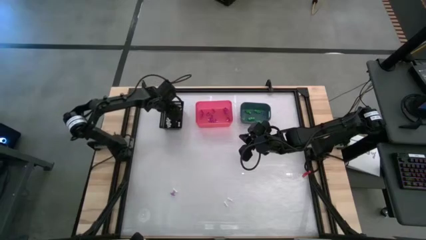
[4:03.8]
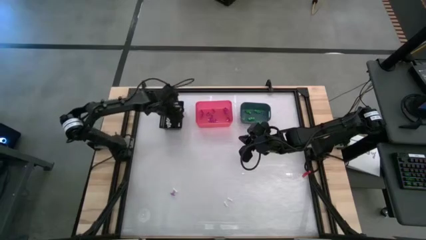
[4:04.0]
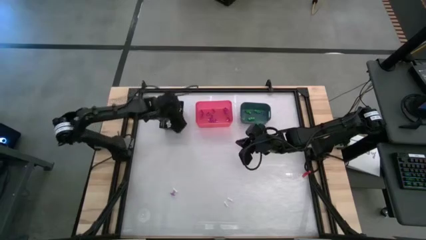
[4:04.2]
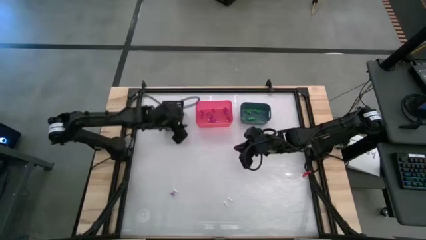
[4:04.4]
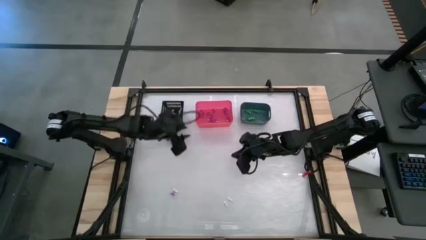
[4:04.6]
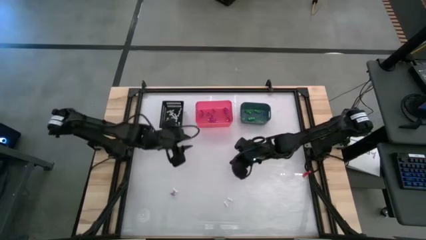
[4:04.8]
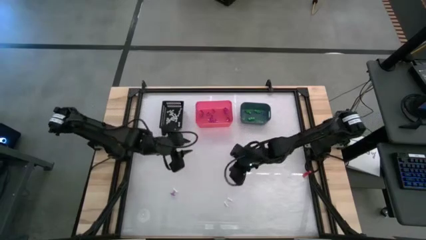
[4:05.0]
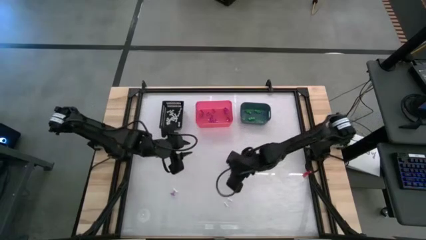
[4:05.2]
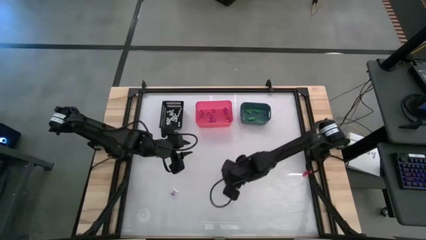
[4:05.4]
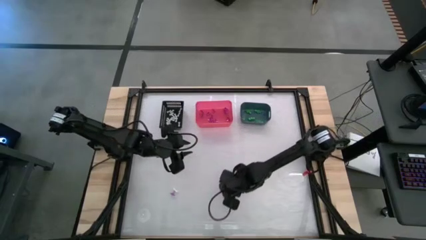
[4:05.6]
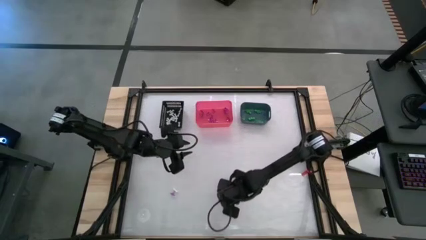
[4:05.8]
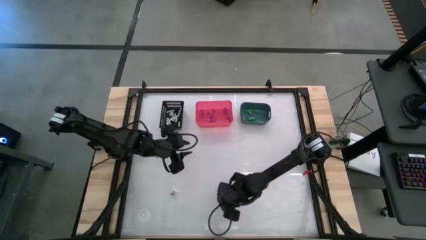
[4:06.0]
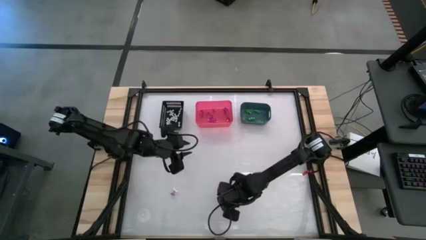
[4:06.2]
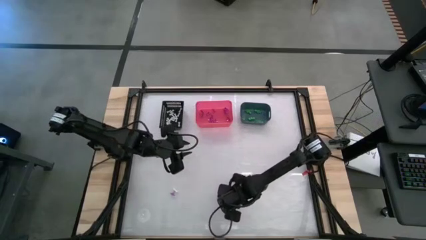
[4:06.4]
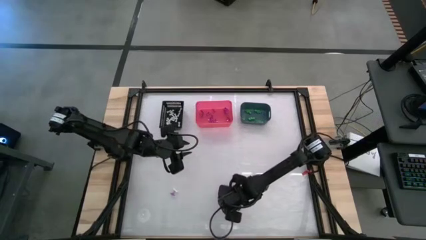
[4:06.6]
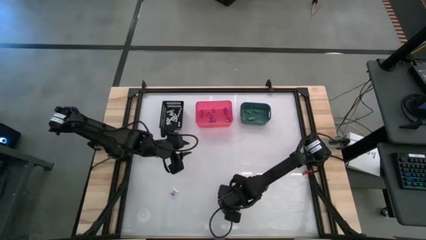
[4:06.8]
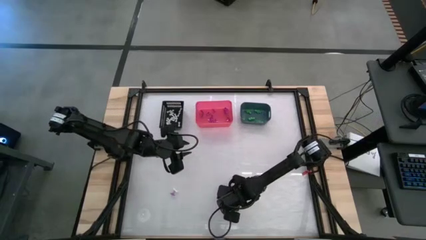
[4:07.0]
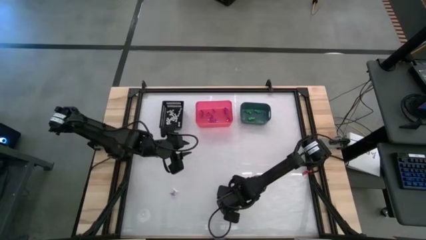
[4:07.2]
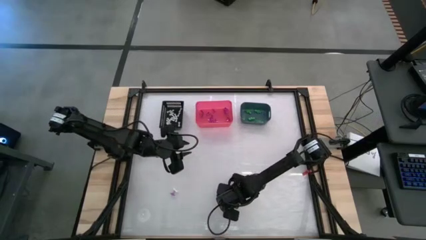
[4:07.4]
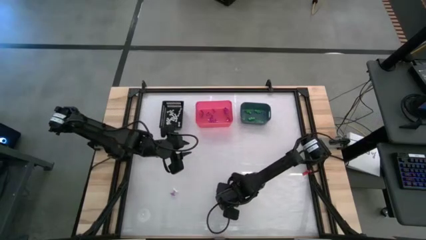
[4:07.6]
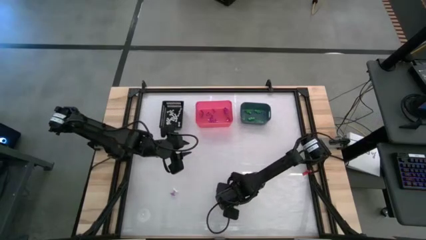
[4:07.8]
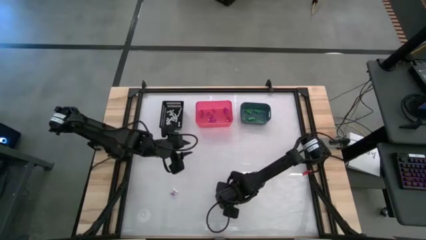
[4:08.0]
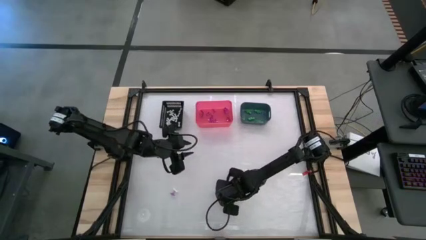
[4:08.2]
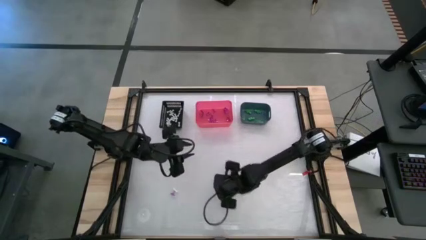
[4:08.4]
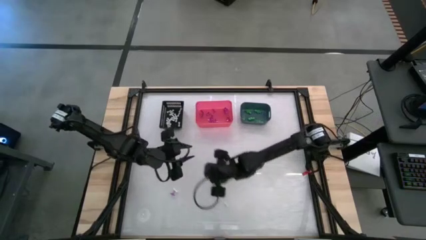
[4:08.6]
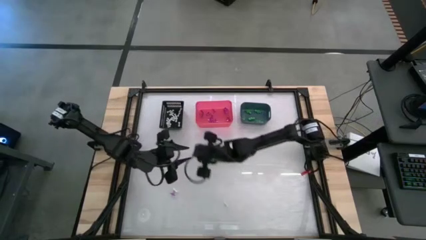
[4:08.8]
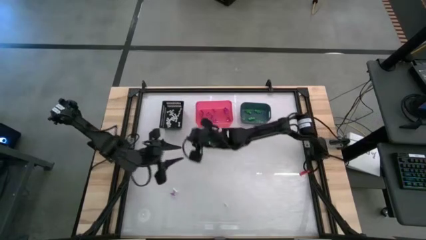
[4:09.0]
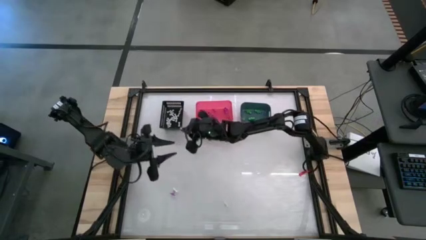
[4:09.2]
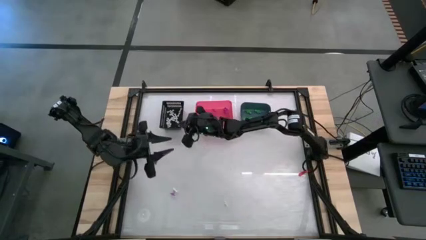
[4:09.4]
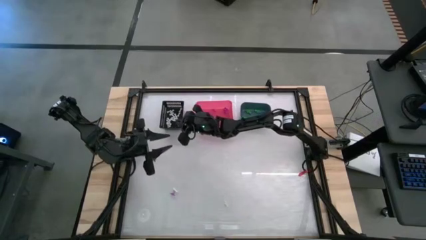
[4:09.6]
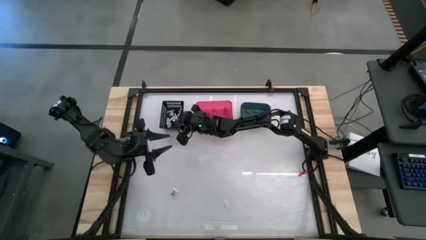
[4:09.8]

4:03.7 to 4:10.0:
Task: Sort Halloween decoration
Put the white bone toy into the black bin

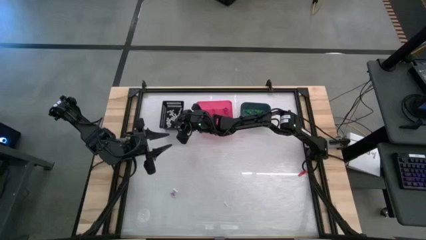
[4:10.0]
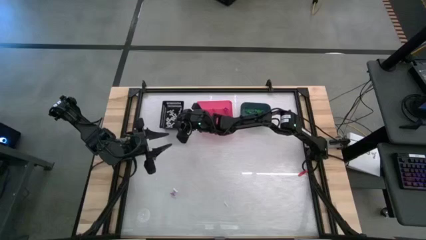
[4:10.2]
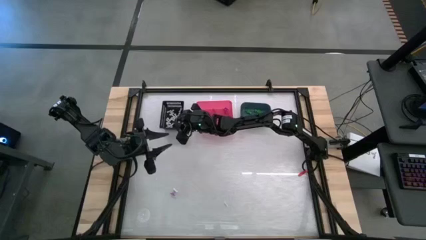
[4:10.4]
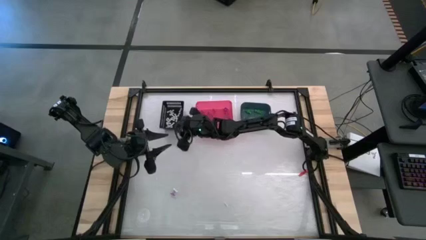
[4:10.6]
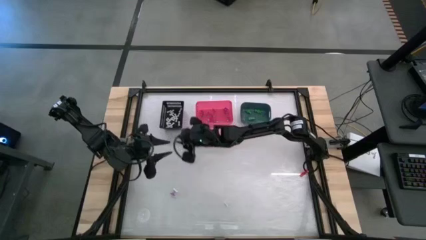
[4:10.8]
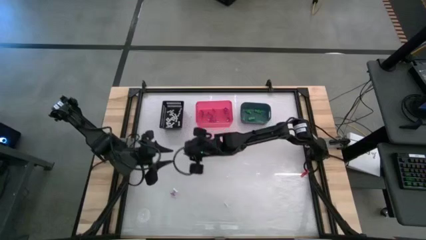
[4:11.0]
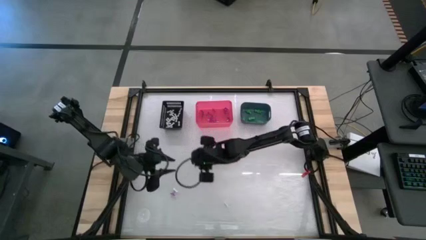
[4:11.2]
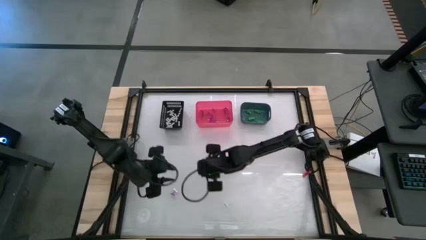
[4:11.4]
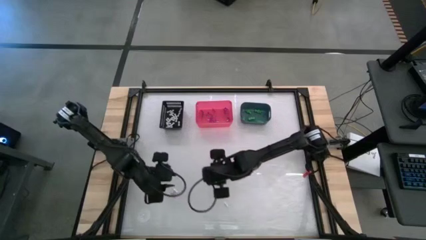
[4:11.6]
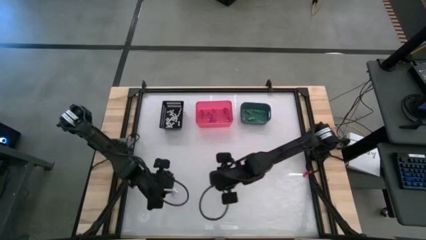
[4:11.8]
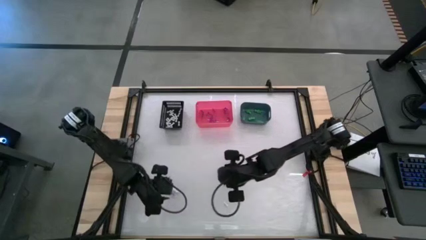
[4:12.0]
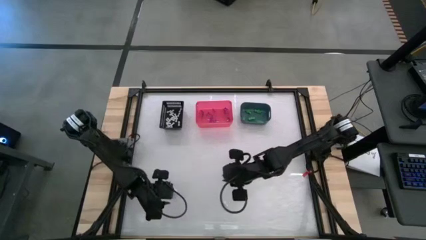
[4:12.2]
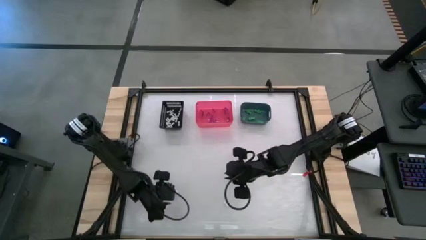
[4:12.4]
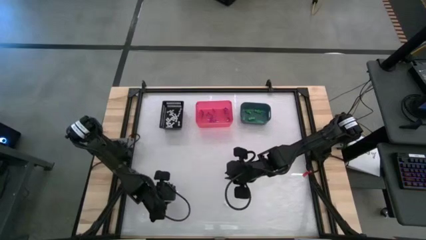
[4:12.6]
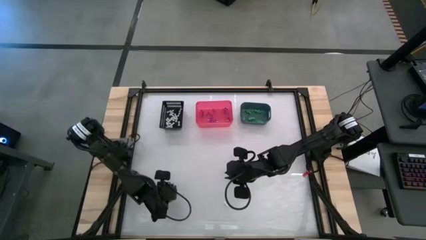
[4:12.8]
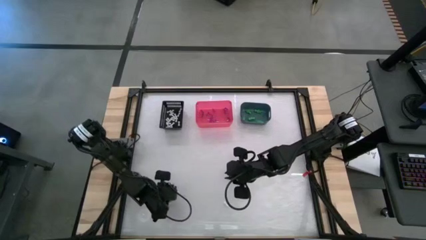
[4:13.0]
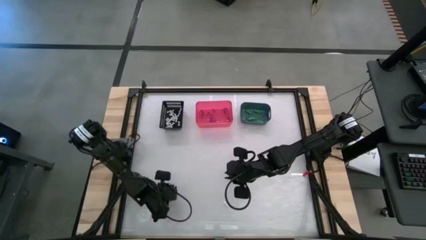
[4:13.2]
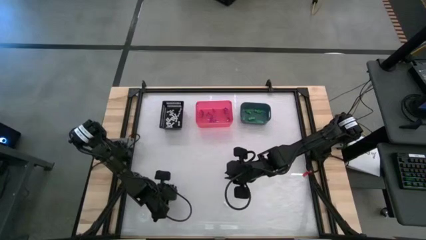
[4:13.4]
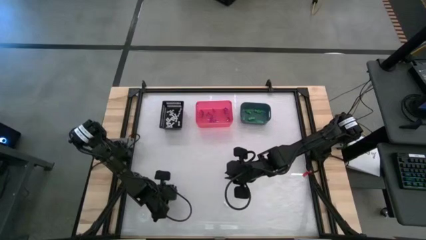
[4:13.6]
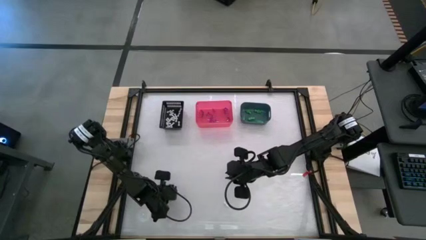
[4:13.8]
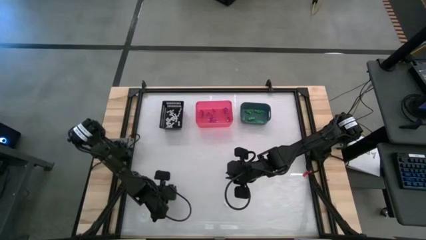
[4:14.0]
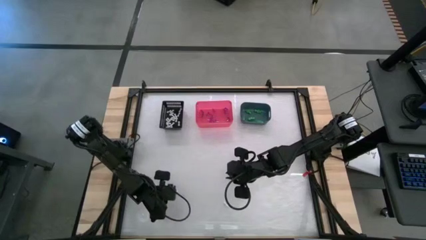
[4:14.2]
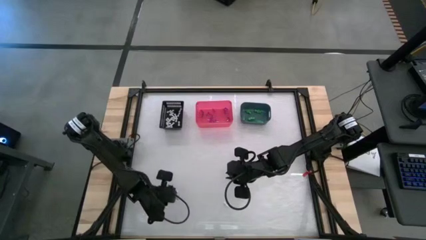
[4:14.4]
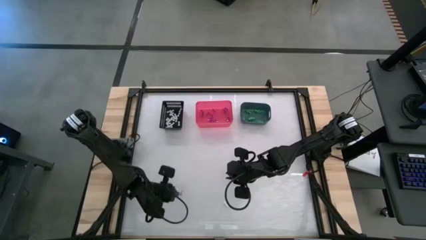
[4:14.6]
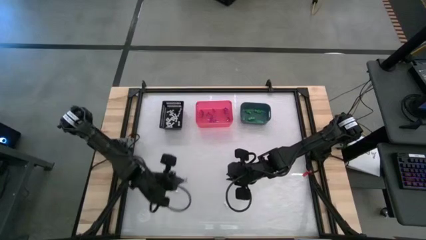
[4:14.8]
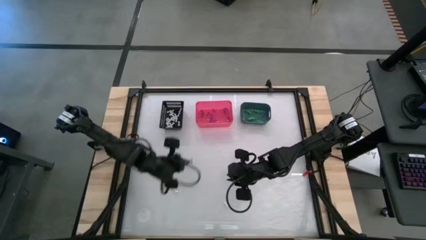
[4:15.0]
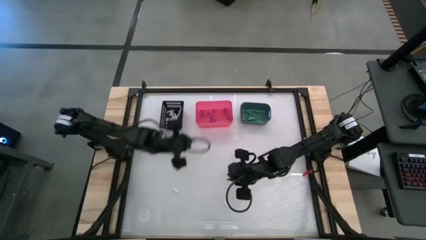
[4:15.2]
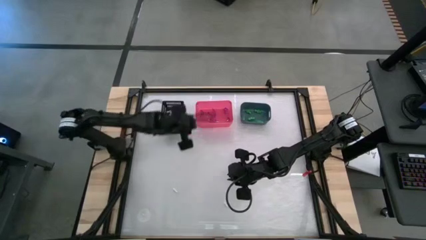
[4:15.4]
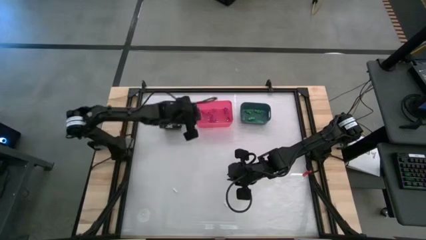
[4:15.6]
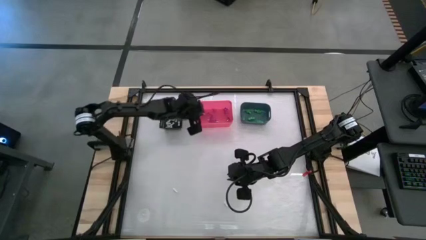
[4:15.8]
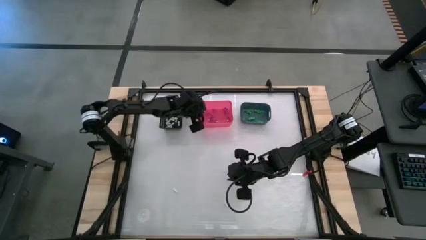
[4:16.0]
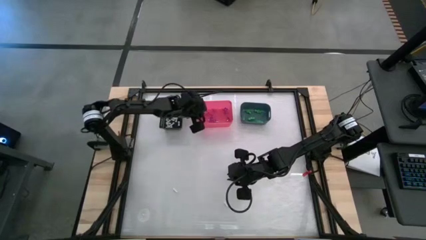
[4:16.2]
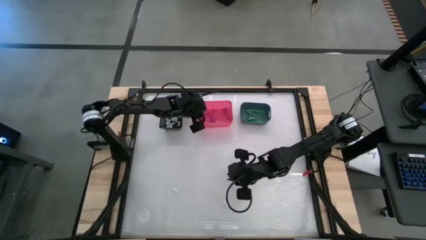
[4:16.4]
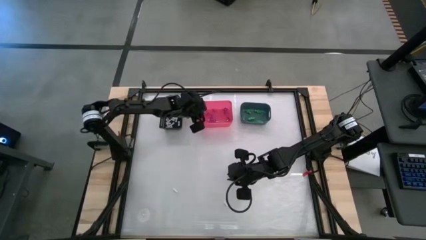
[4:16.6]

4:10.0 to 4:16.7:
Put the purple hat toy into the pink bin

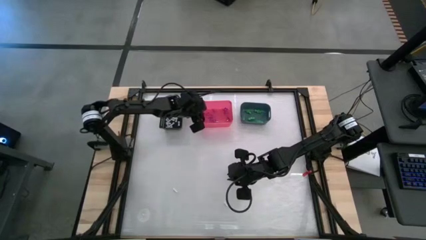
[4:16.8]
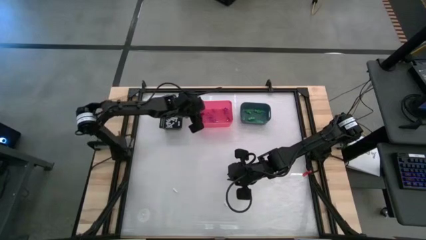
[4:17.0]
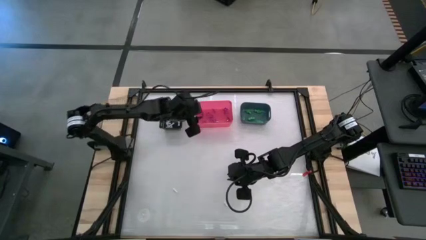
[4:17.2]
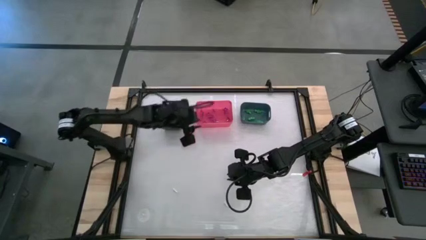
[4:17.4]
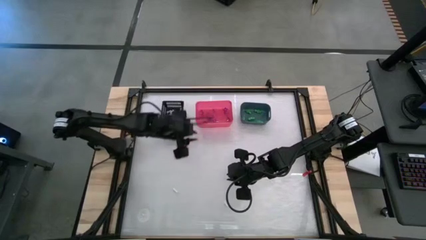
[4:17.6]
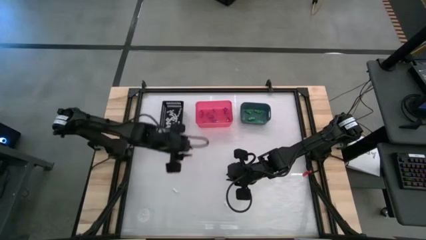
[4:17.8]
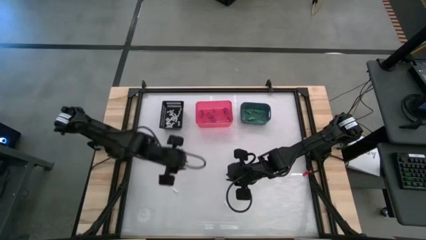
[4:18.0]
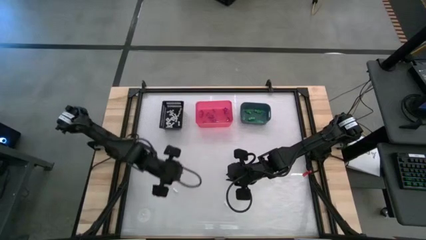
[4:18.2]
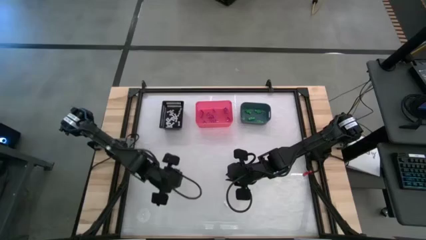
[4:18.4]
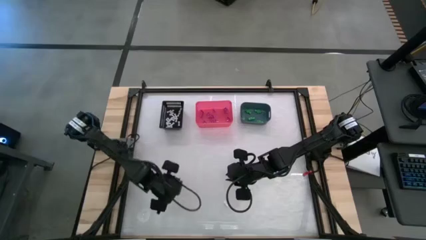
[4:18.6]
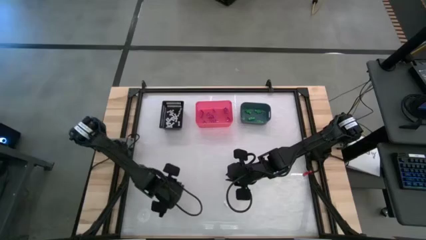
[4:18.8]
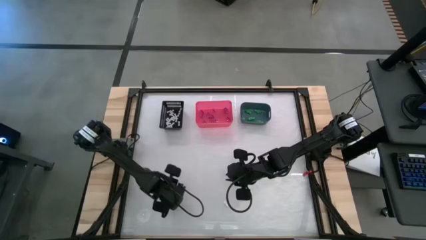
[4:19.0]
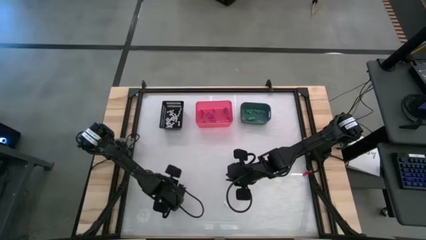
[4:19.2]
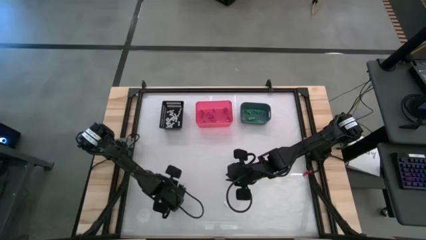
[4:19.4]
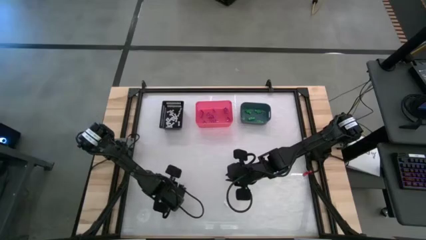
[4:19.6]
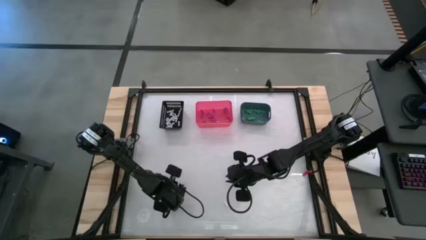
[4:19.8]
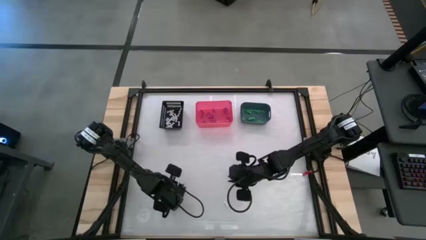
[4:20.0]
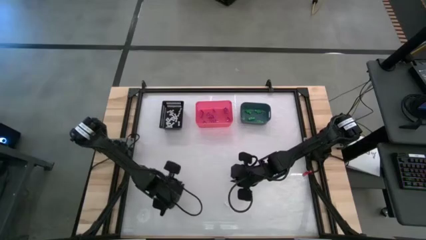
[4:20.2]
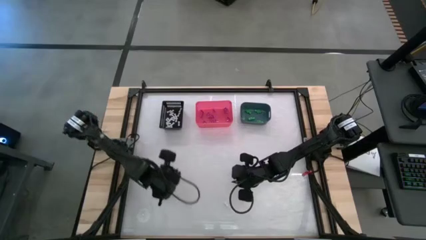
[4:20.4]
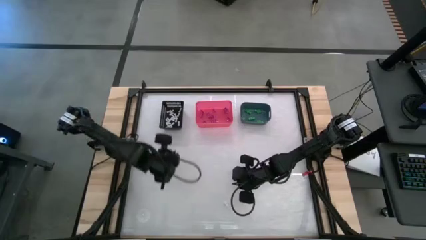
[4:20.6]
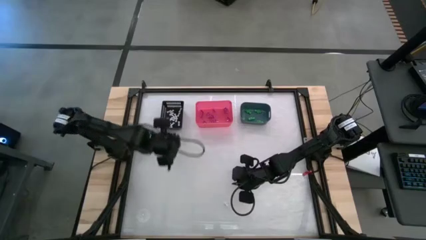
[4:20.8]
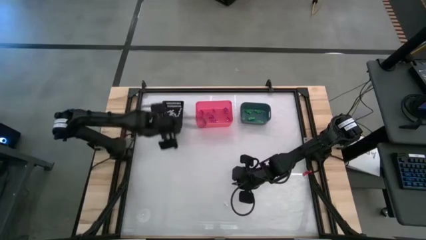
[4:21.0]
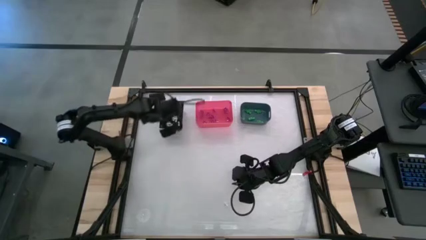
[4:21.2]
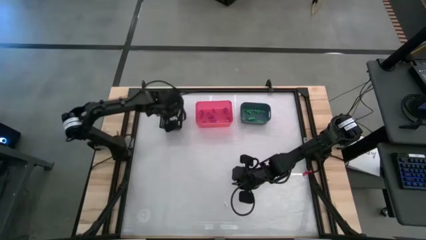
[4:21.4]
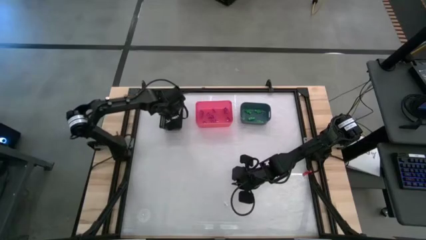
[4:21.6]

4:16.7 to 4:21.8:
Put the white bone toy into the black bin
